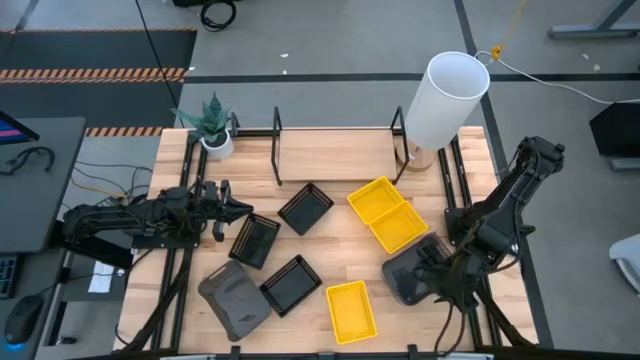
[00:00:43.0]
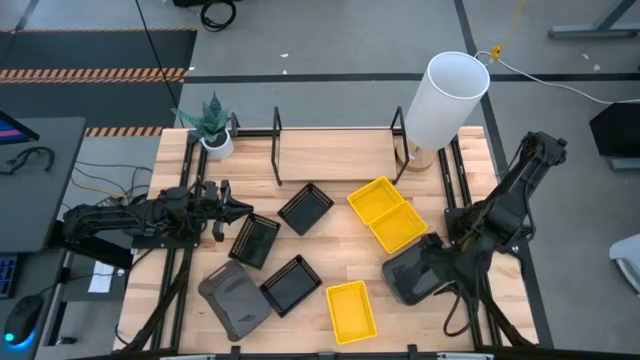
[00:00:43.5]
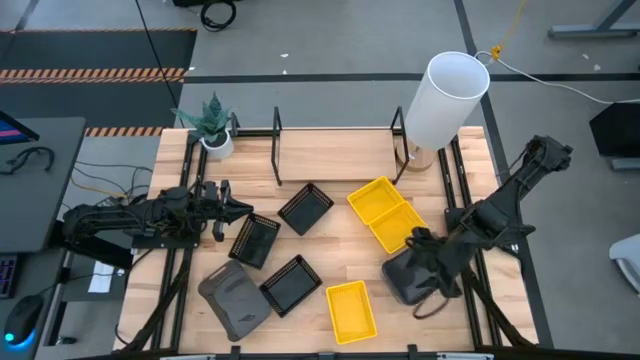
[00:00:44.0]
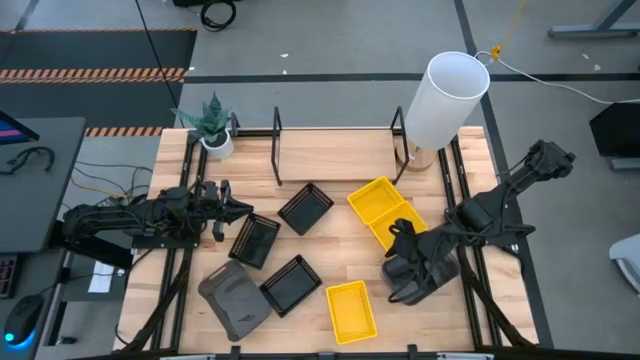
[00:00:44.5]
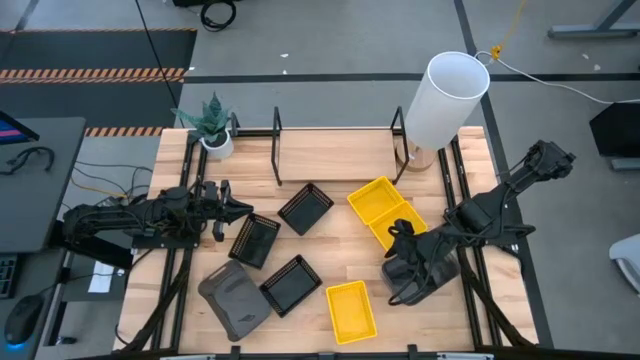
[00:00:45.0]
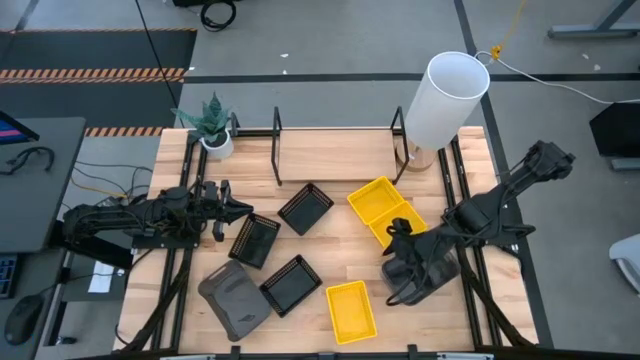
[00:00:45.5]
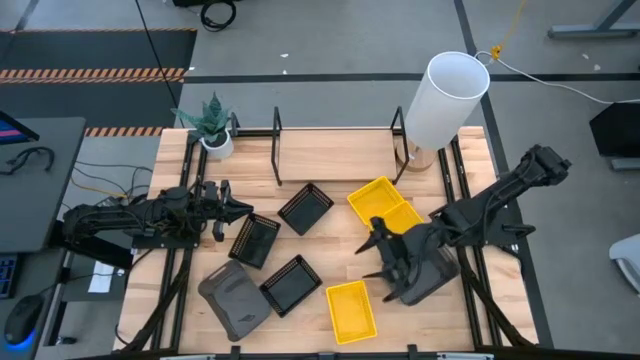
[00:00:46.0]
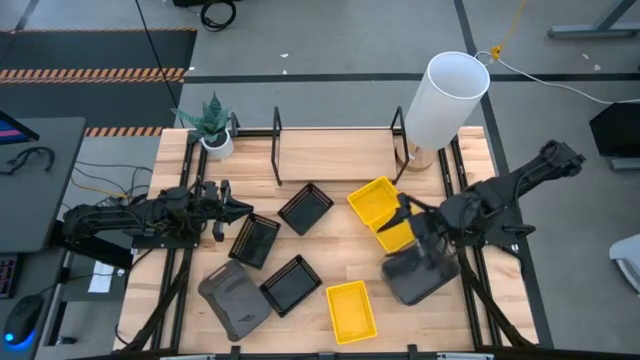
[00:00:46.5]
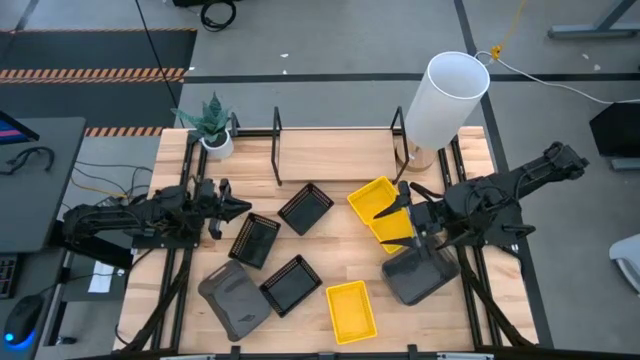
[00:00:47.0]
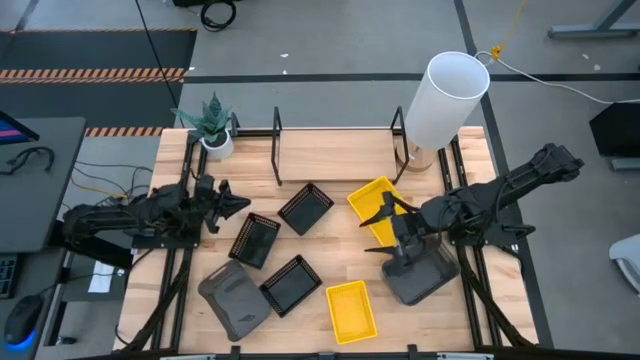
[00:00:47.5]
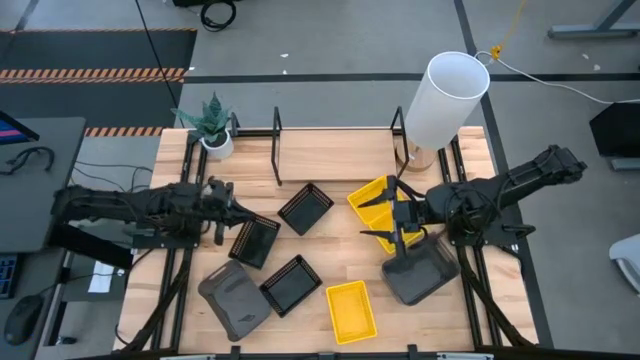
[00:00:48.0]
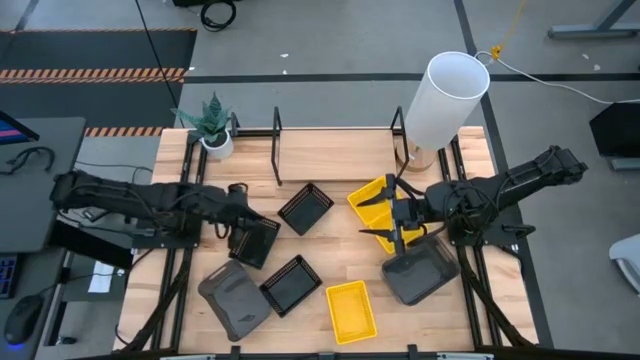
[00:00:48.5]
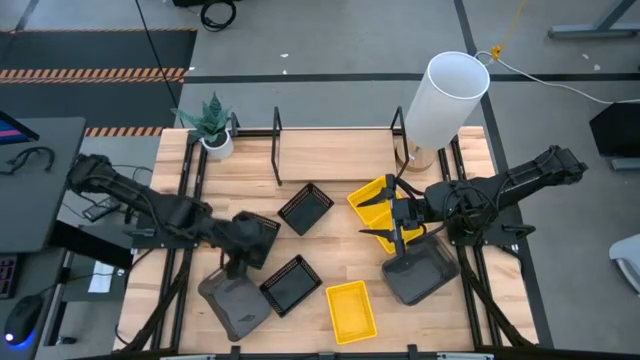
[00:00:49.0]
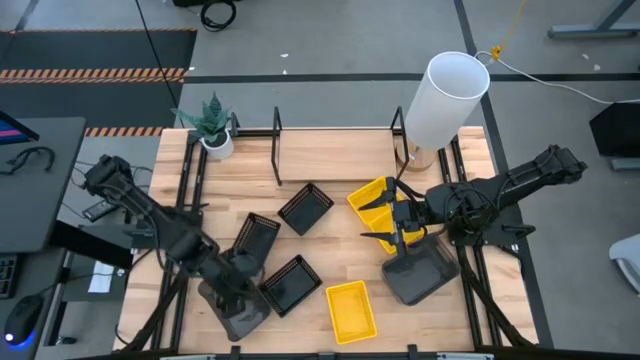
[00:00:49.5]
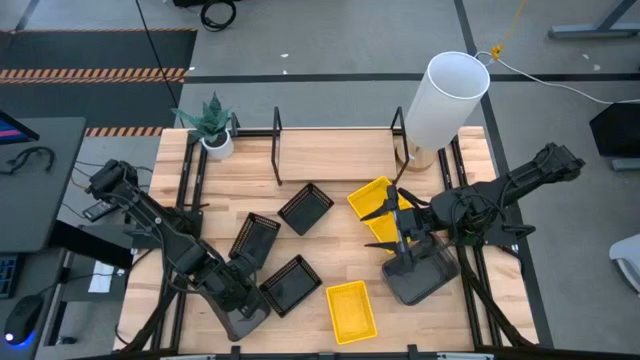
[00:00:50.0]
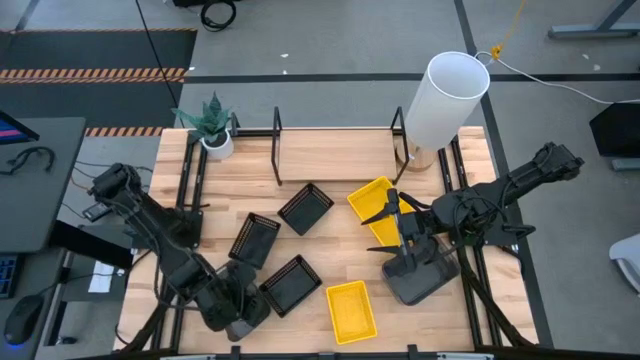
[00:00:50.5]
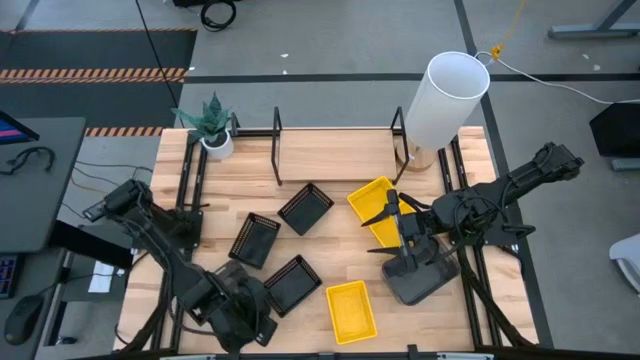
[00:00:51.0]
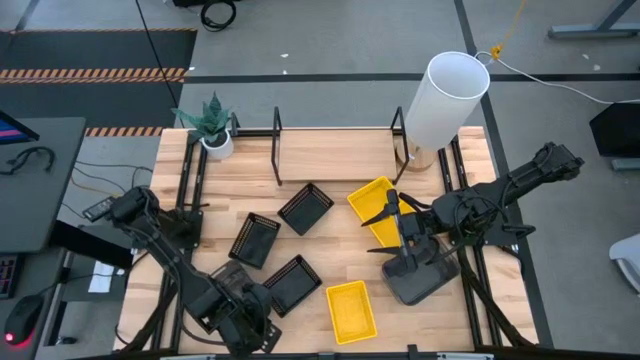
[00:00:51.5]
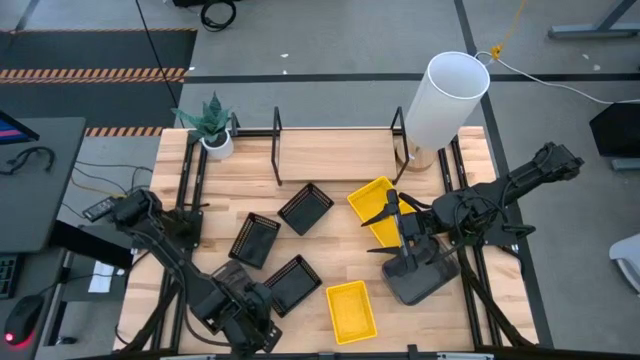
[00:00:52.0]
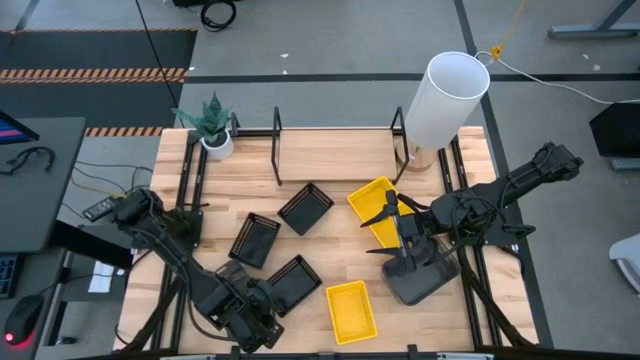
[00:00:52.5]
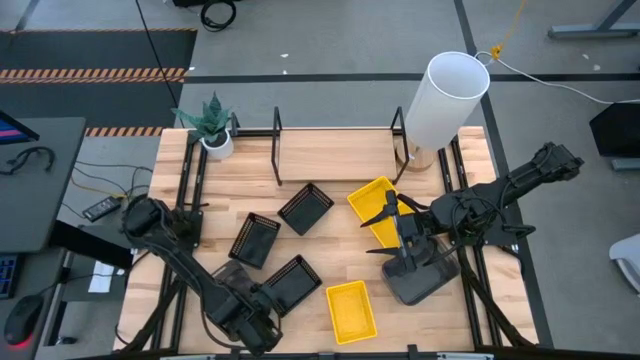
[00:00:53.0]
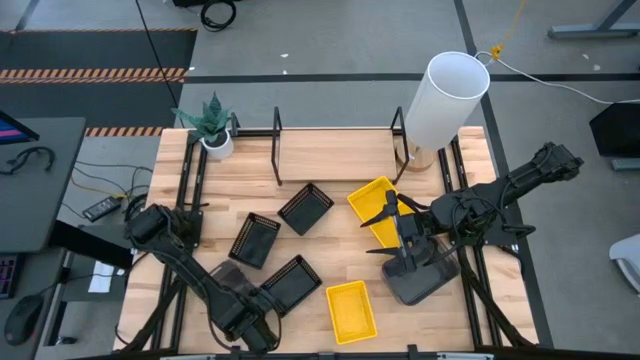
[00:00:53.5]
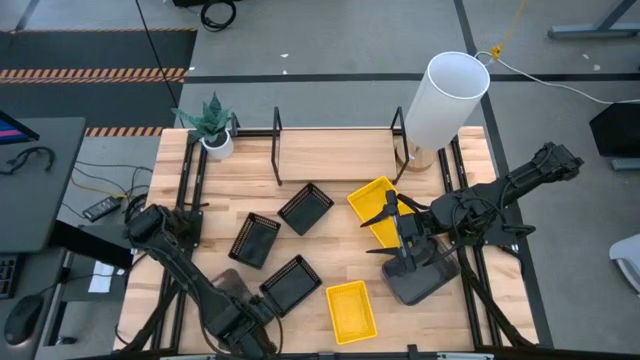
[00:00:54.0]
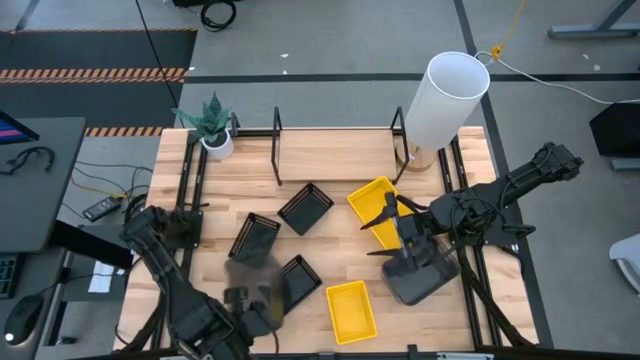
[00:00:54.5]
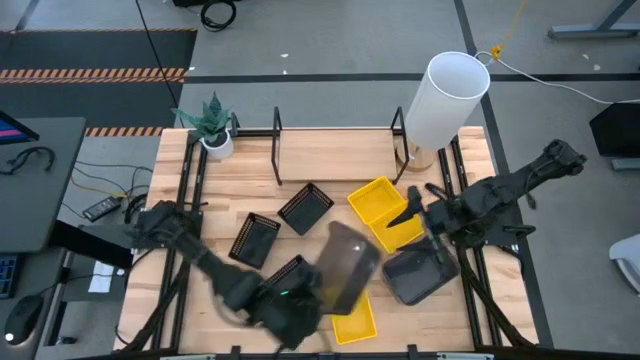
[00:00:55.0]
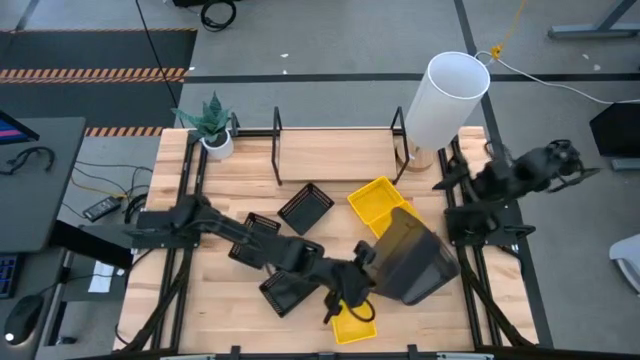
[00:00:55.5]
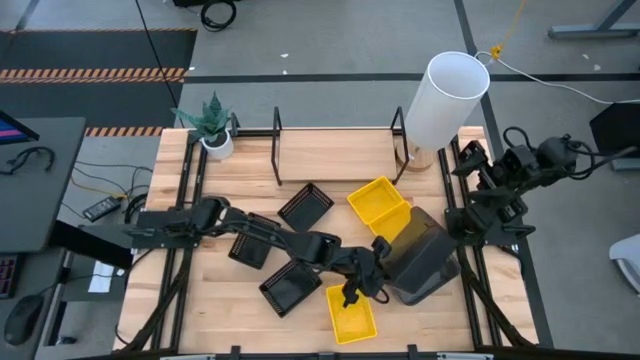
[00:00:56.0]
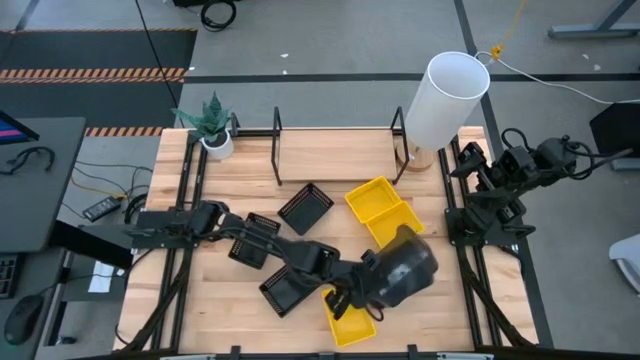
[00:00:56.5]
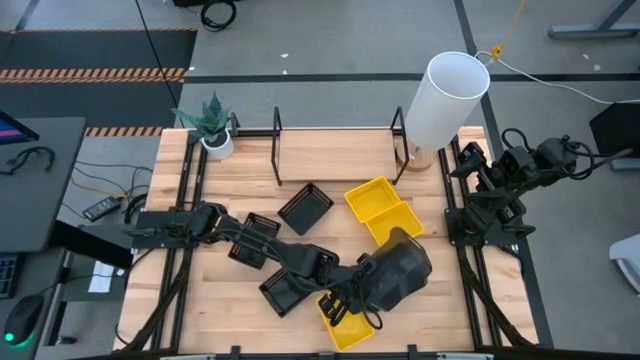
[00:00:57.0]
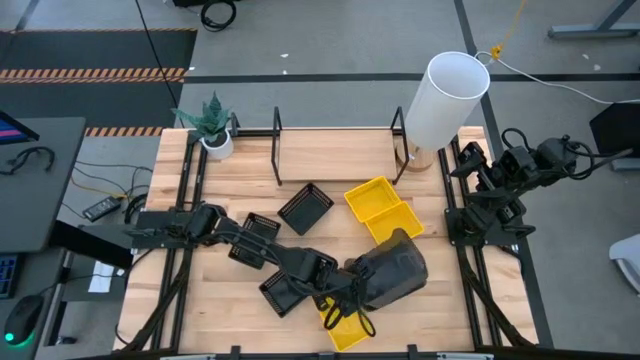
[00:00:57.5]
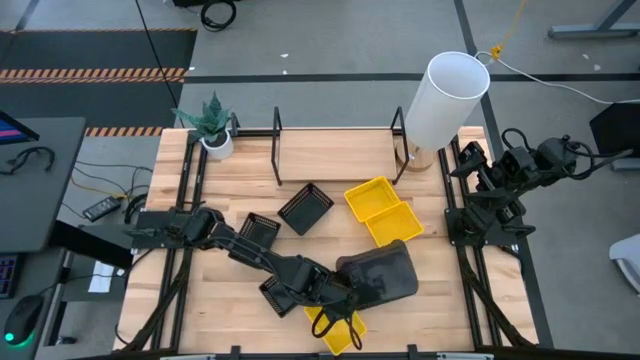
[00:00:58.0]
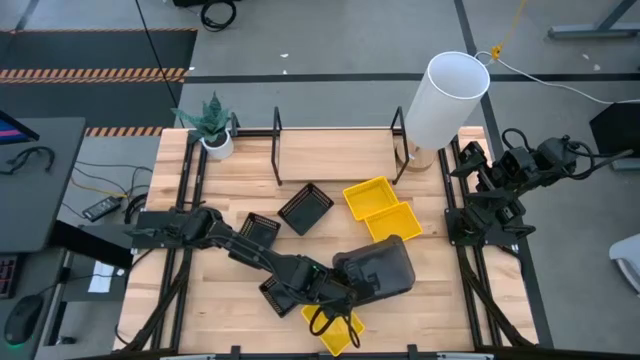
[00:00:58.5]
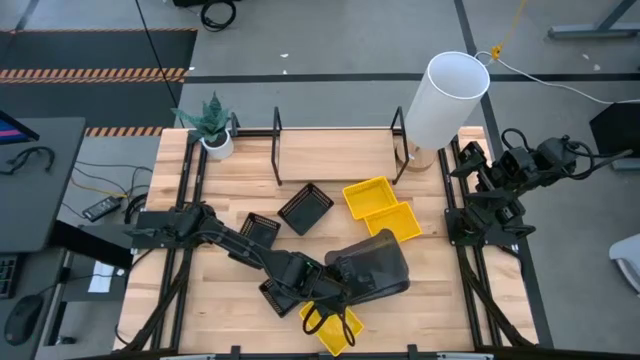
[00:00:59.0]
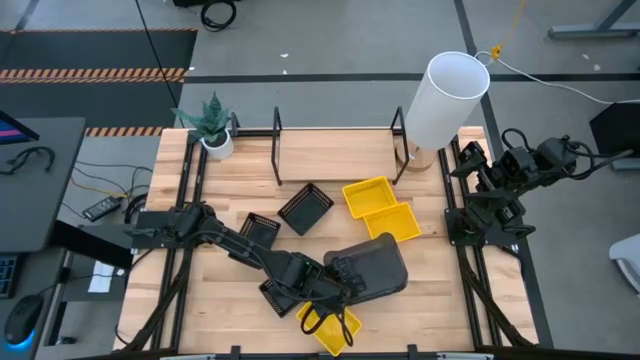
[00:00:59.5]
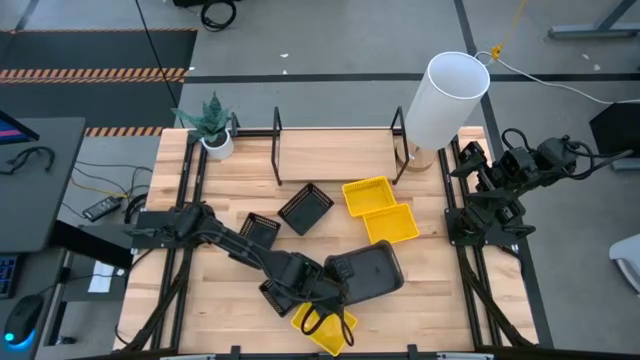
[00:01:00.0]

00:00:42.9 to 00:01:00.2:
Task: Stack baskets on shelf by color
Stack the left black transparent bin on the stacked black transparent bins
